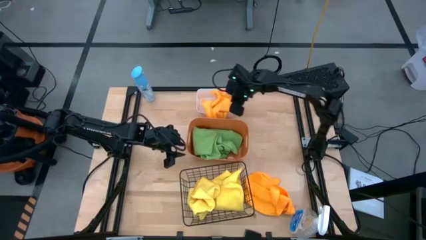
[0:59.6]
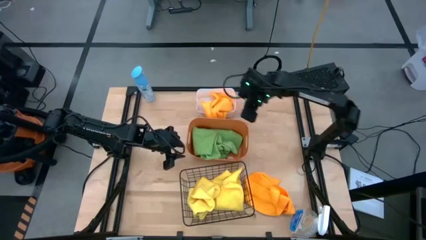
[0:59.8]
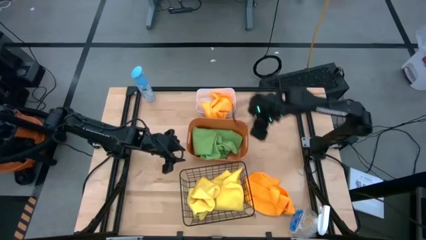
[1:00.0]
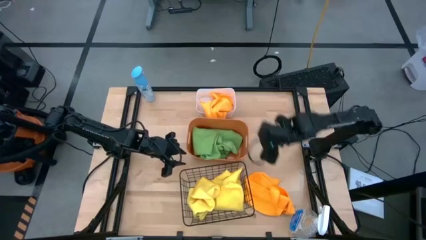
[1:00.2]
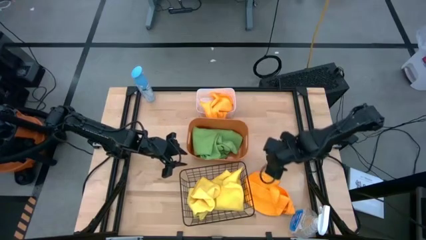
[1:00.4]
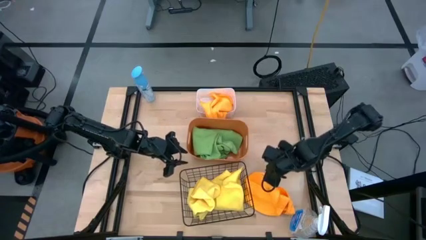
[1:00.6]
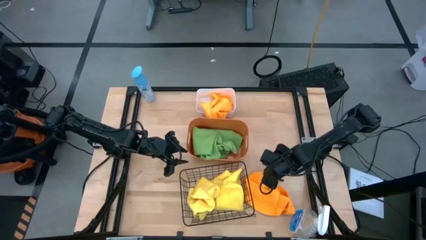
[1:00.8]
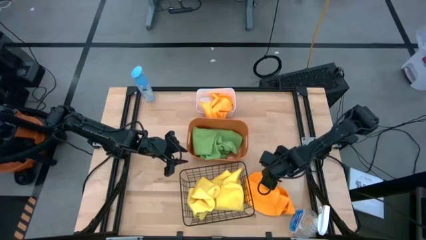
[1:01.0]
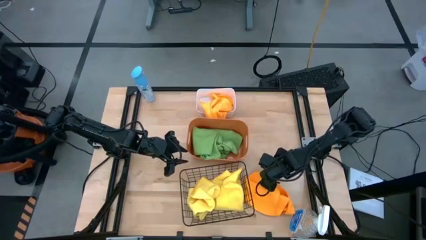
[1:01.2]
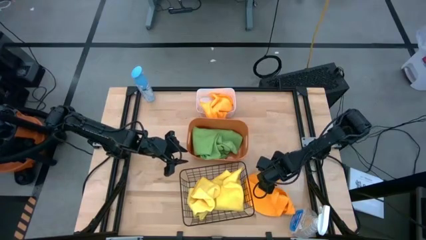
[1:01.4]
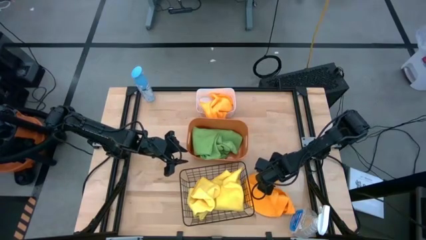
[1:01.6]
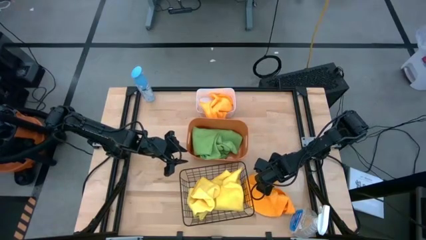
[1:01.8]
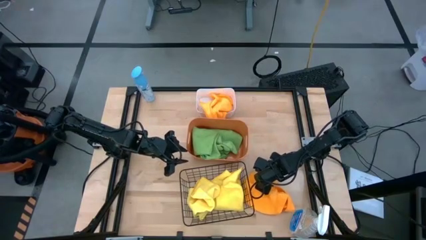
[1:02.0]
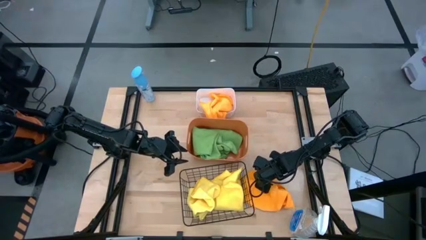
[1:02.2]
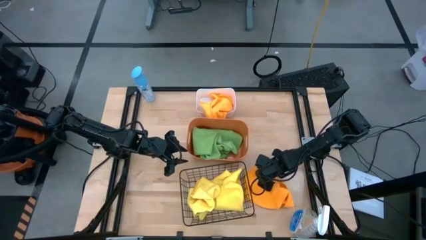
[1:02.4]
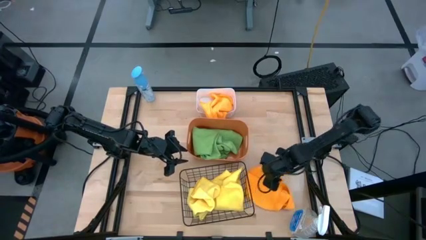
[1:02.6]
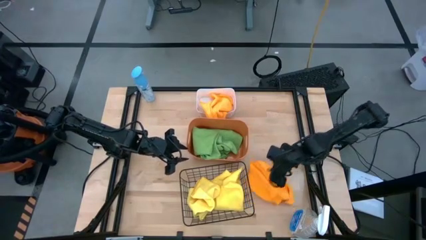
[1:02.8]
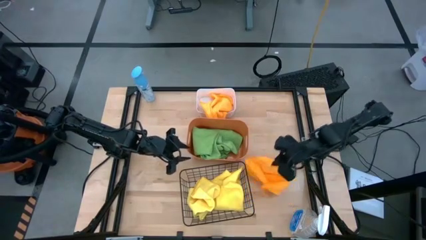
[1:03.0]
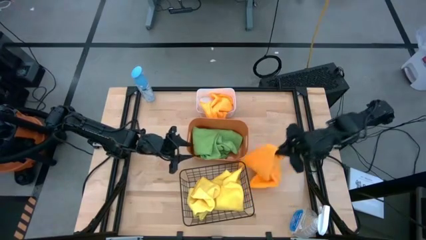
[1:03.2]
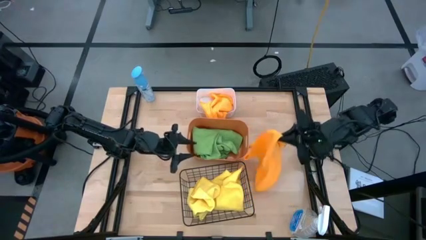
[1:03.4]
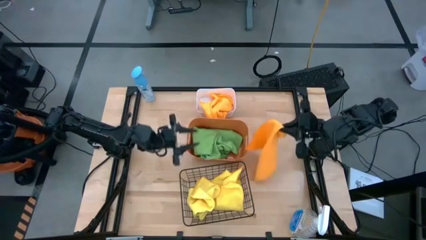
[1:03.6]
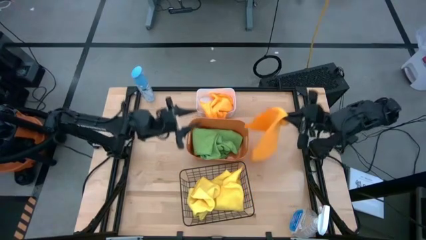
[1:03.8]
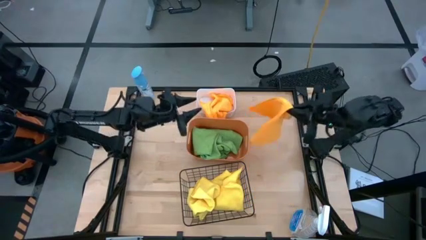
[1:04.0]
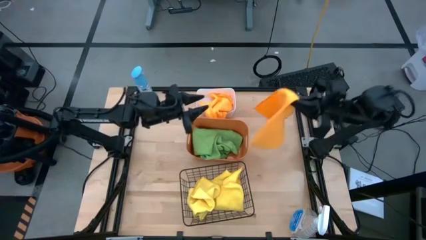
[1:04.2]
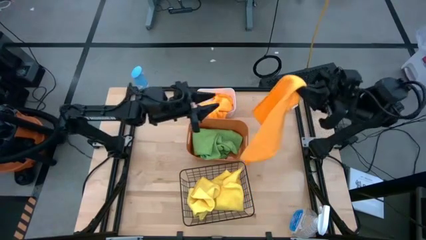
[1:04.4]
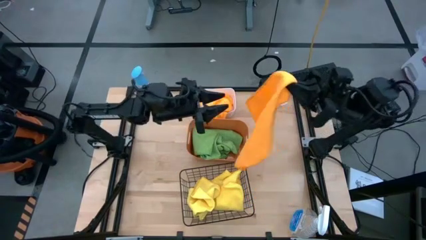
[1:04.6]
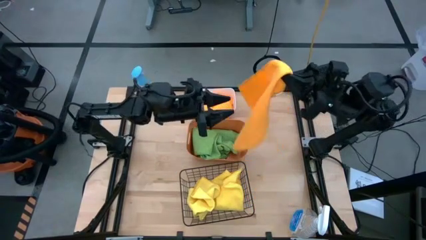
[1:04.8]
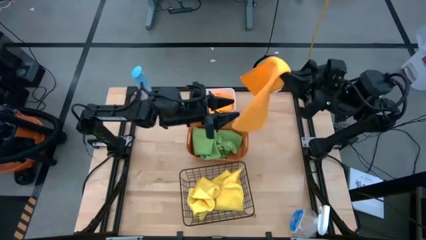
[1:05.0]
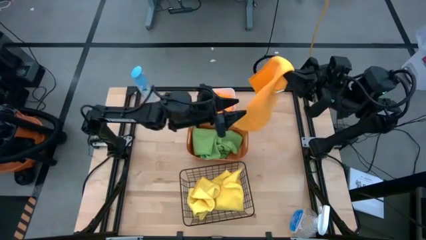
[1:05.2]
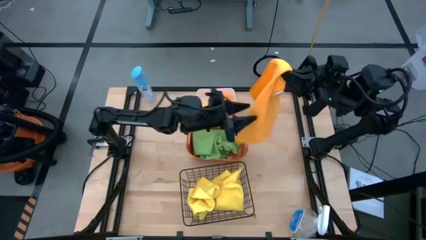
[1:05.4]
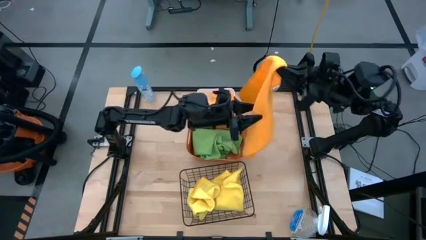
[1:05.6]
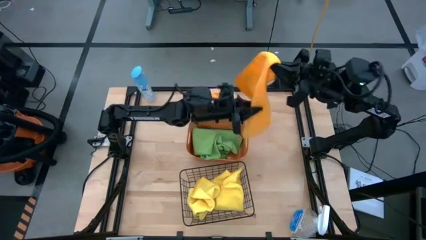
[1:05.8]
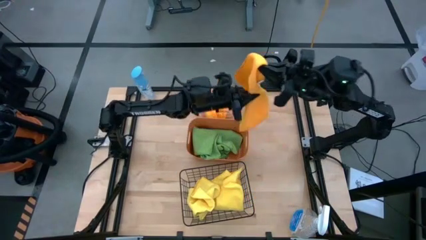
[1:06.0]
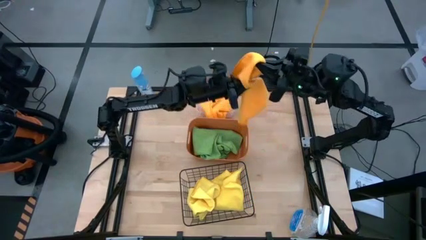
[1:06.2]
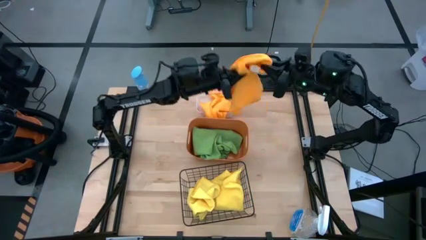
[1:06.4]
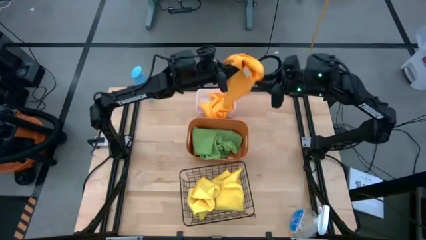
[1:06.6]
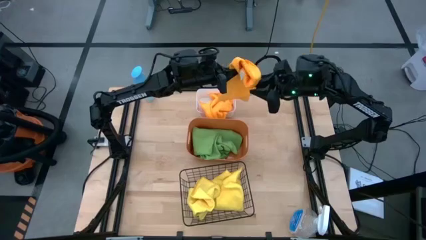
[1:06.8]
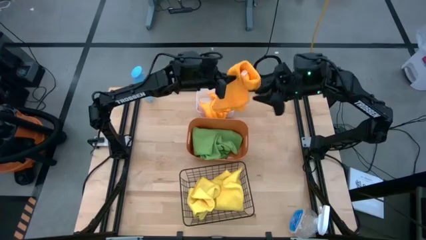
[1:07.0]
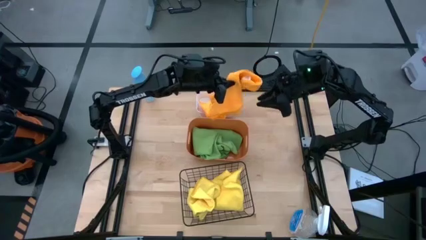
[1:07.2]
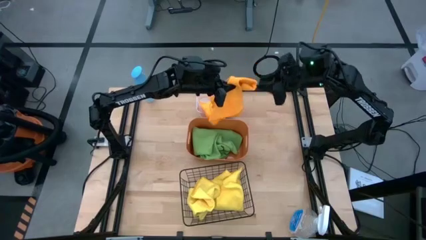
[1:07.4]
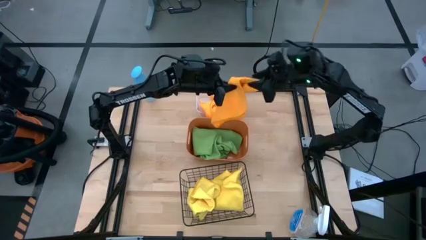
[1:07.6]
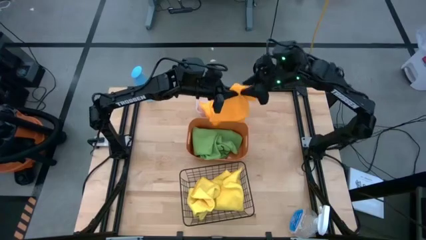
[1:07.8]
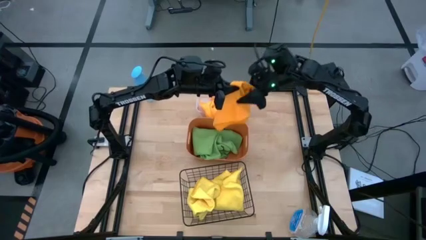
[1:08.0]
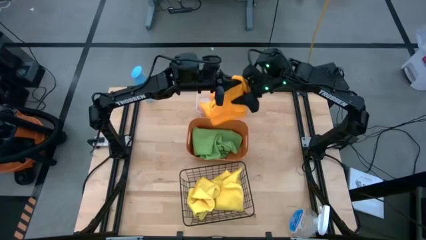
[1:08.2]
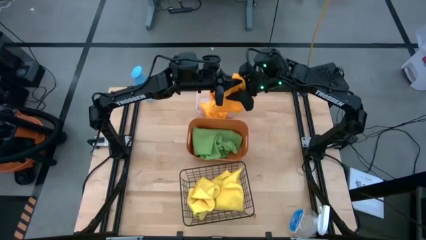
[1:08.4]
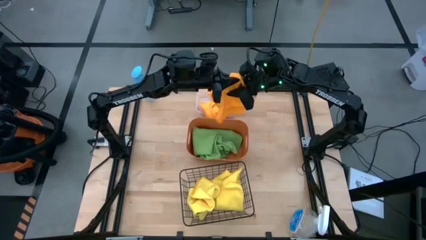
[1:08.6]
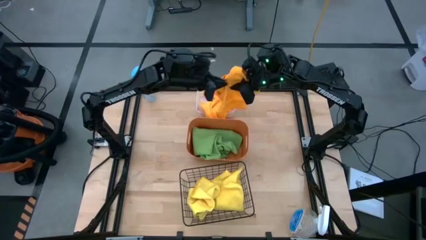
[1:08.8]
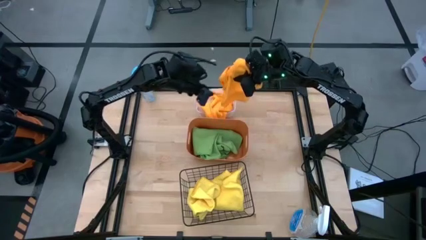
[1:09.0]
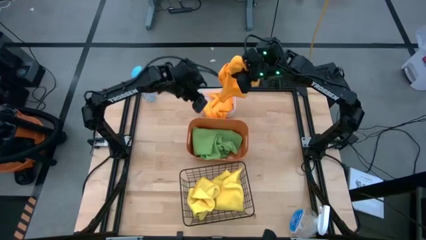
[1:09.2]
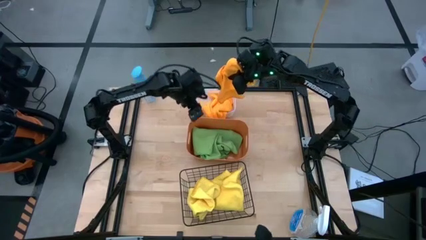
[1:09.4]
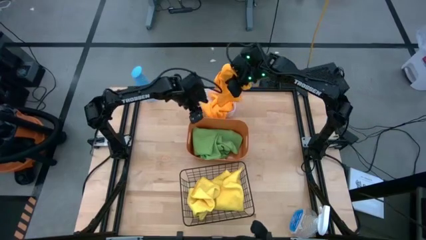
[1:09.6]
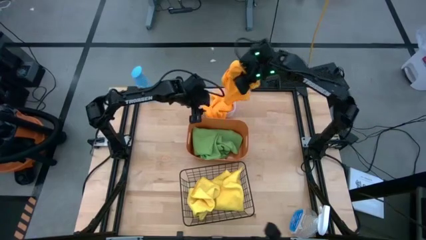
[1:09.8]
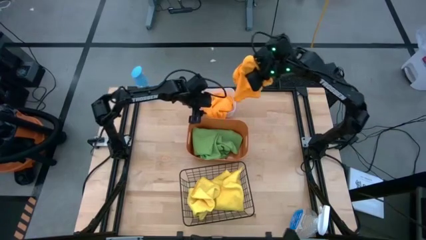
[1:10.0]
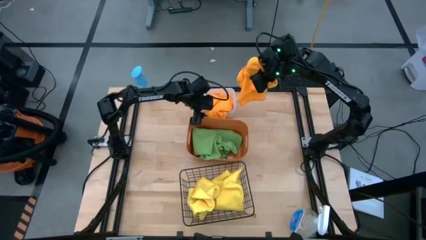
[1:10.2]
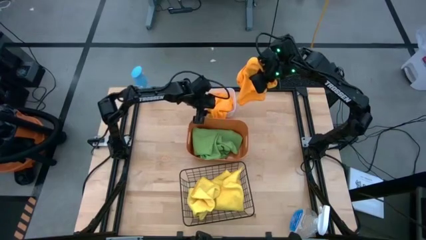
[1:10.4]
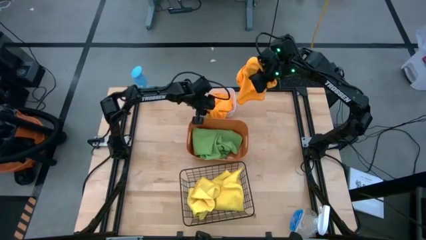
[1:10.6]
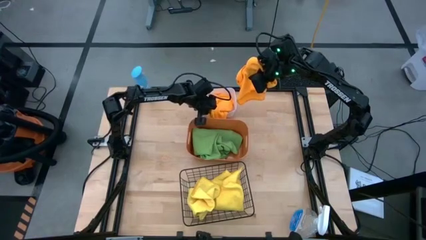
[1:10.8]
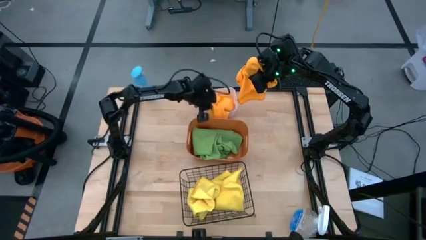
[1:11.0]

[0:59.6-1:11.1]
Task: Sort microfiber towel by color & place in baskets
Put the orange towel into the white bin
